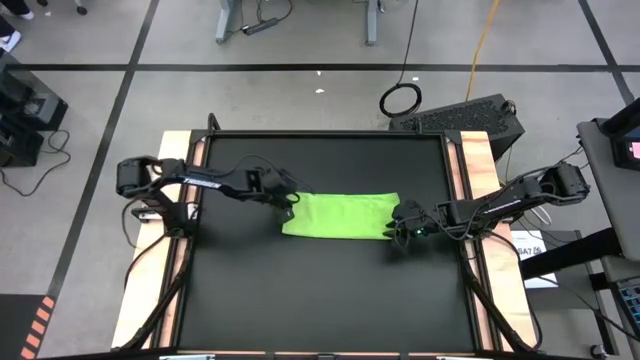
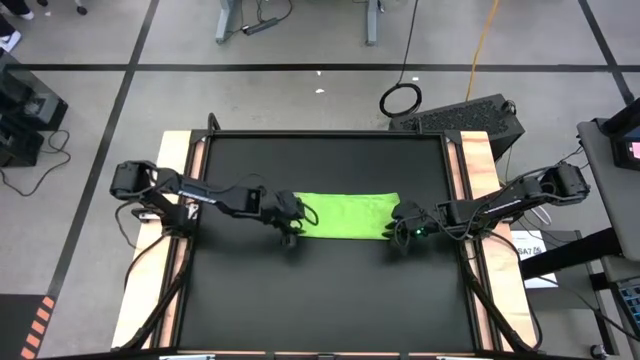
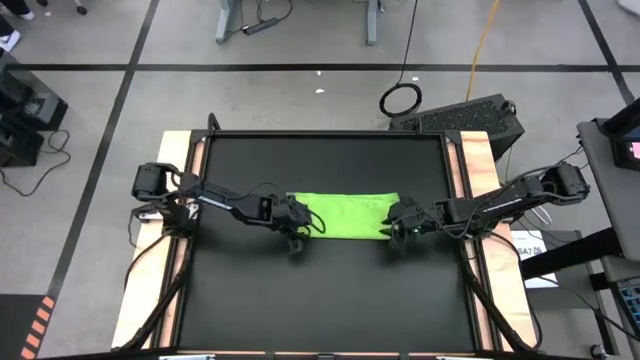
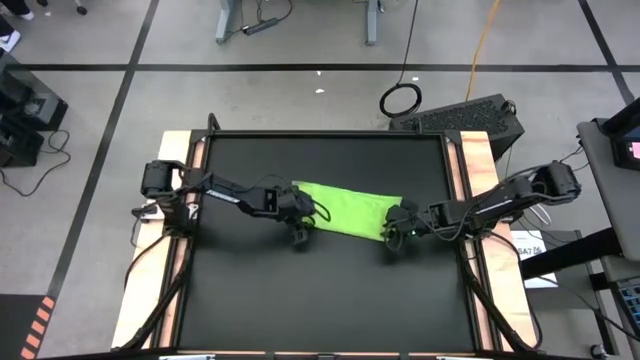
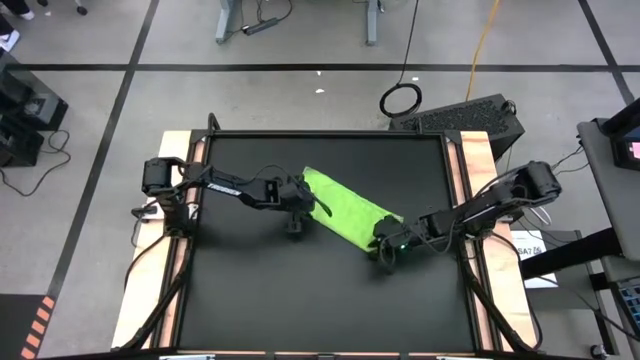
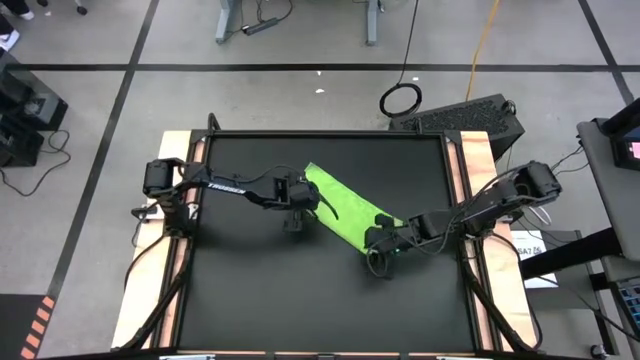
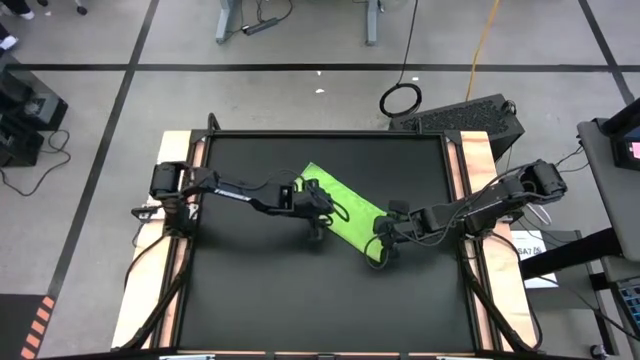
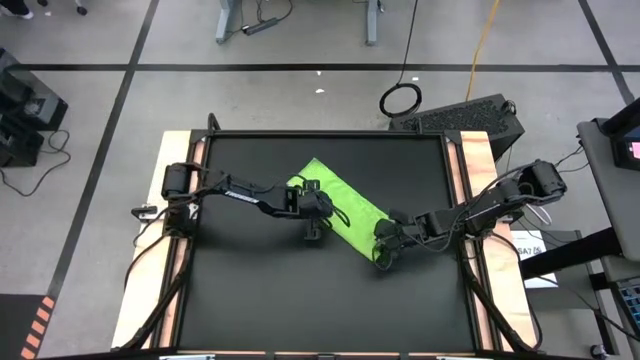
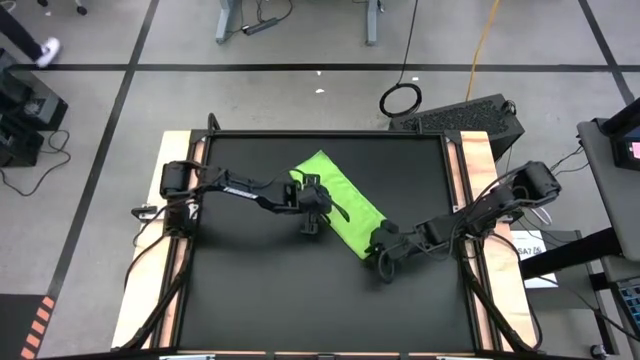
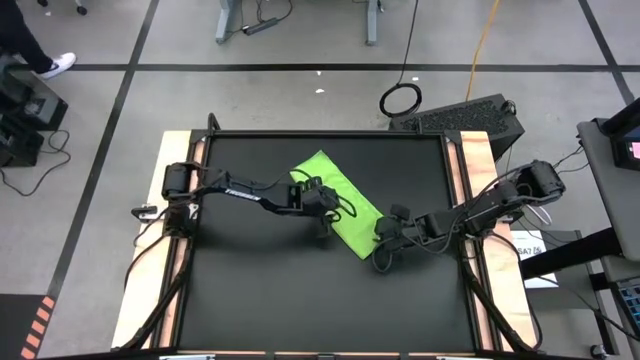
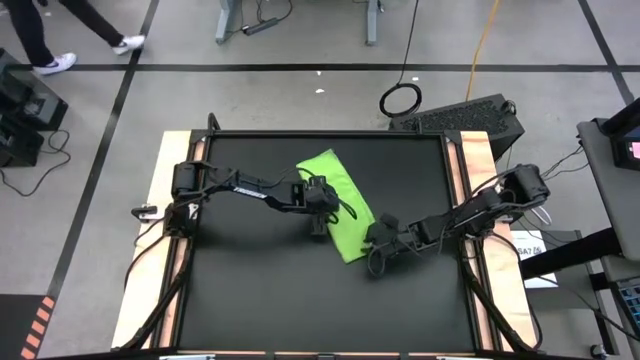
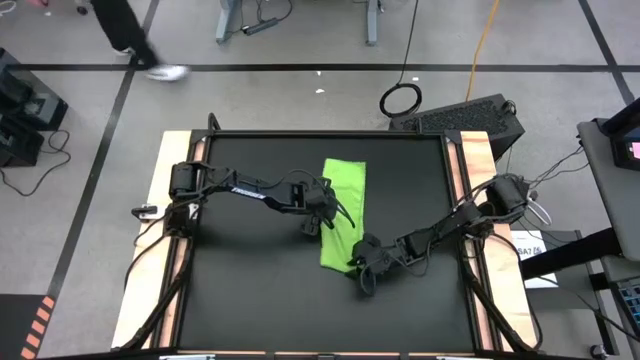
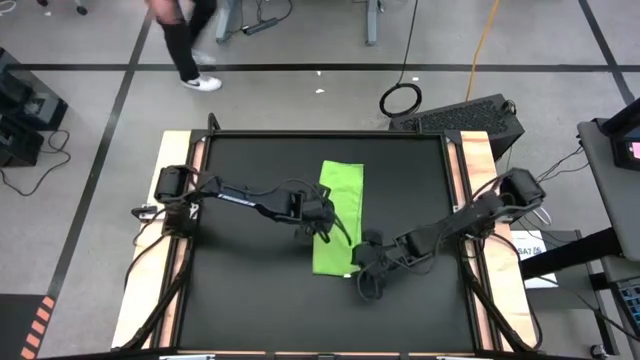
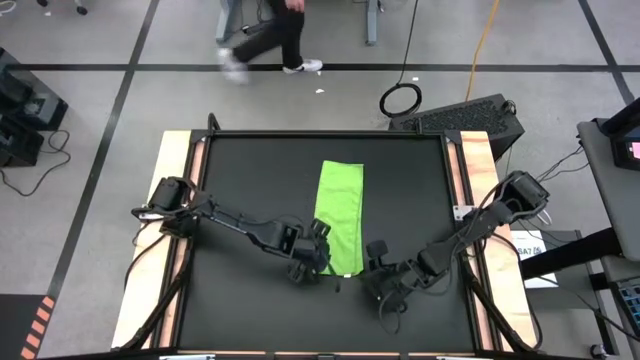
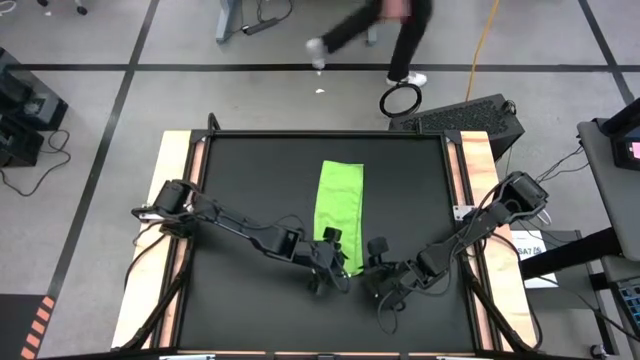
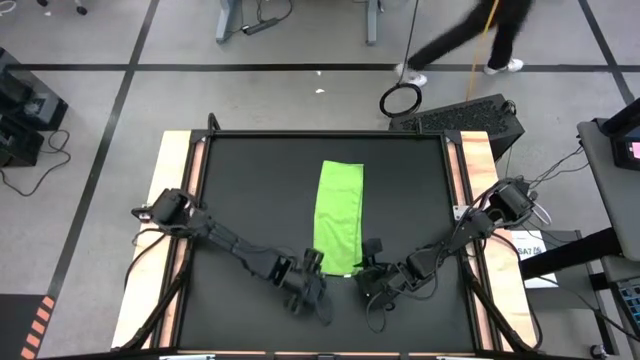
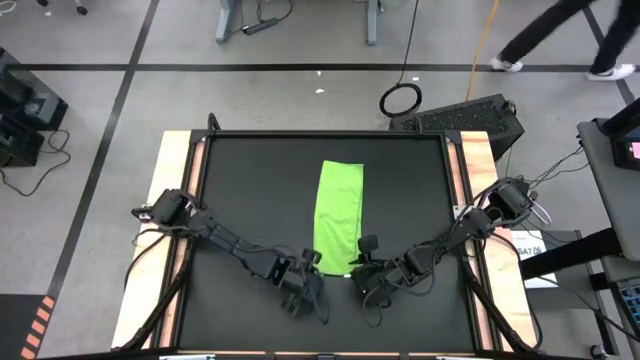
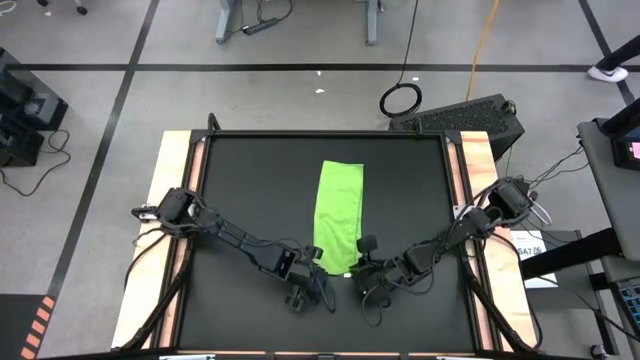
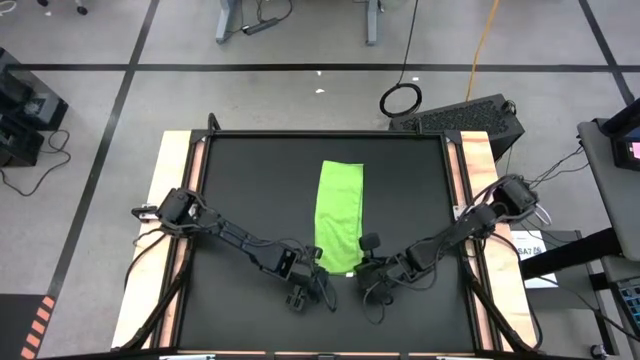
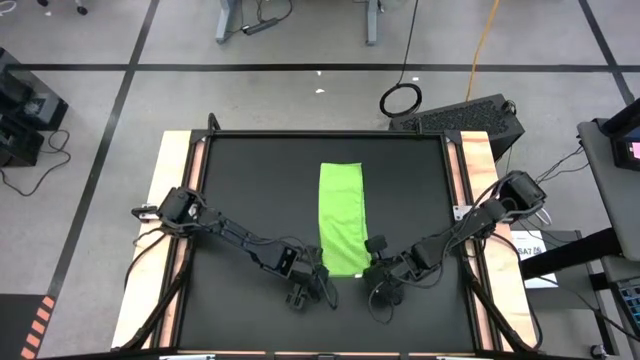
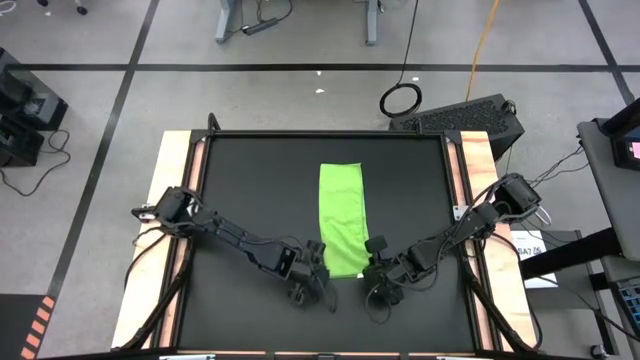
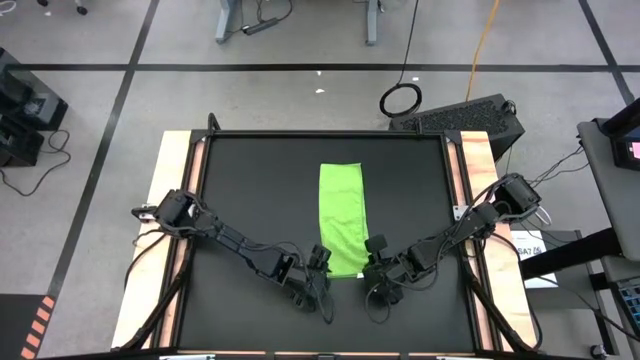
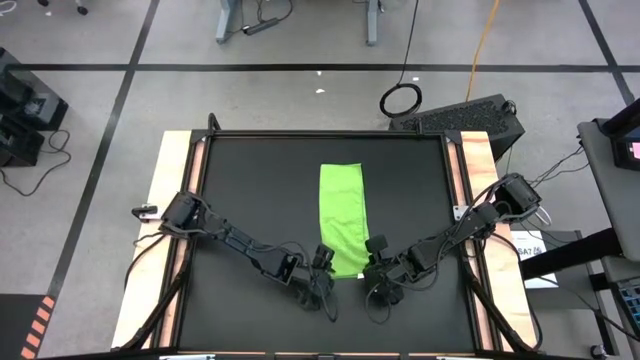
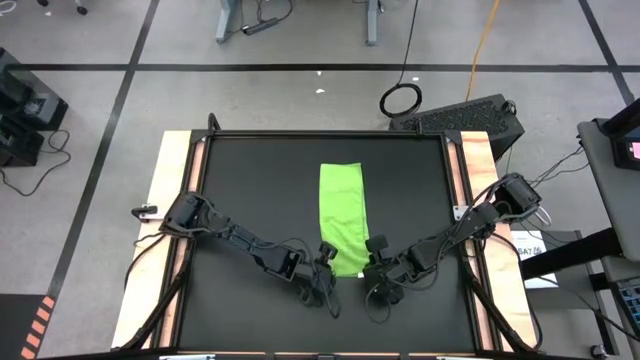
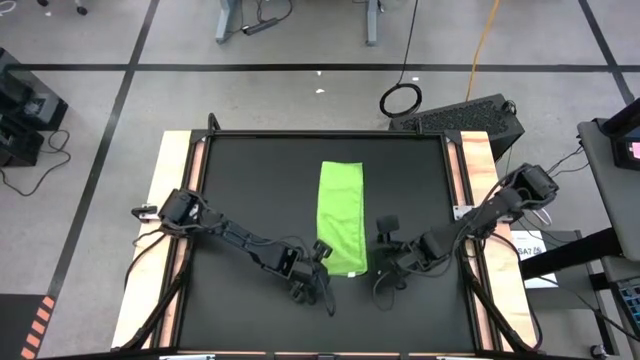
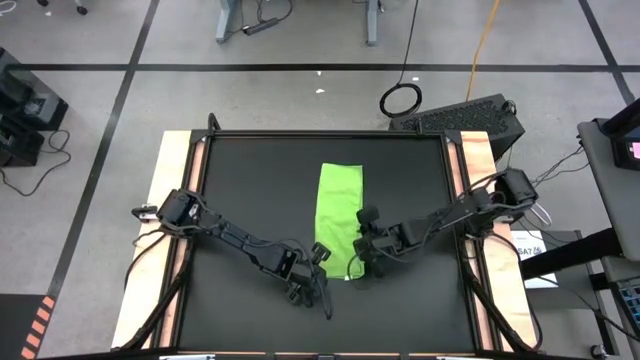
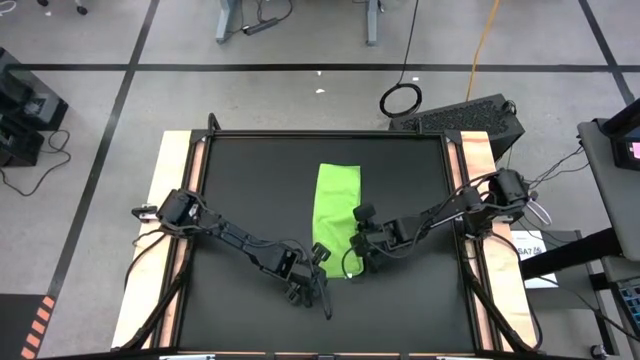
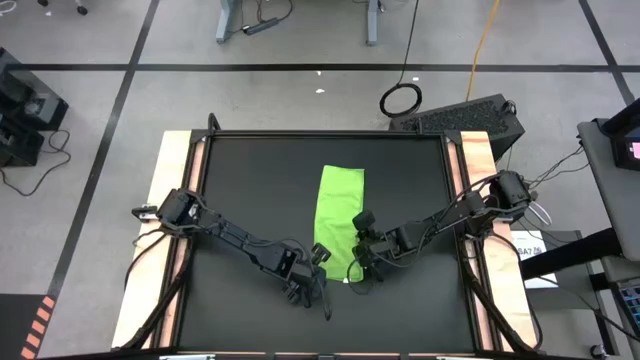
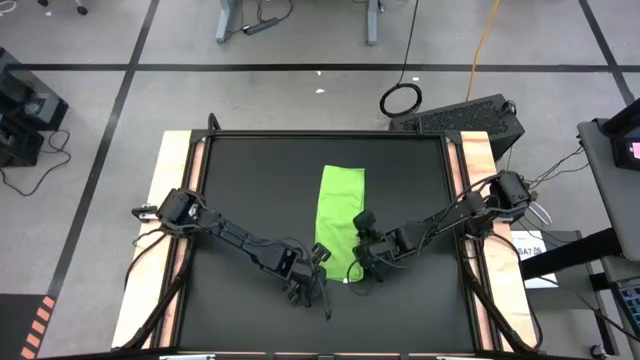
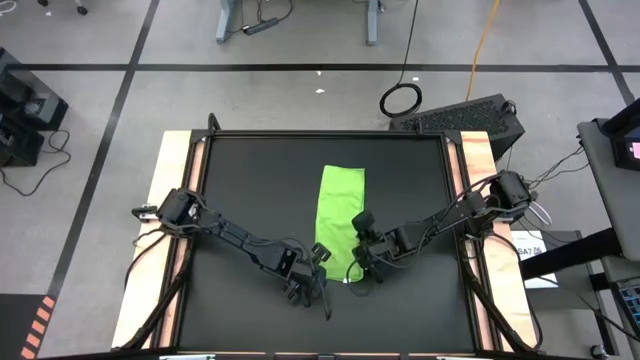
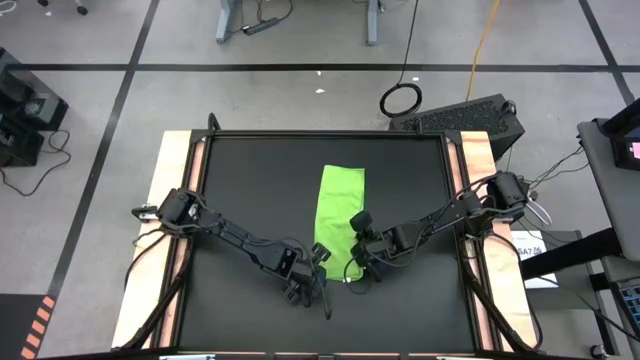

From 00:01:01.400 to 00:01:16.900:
Task: Roll towel
Fold green microfiber towel

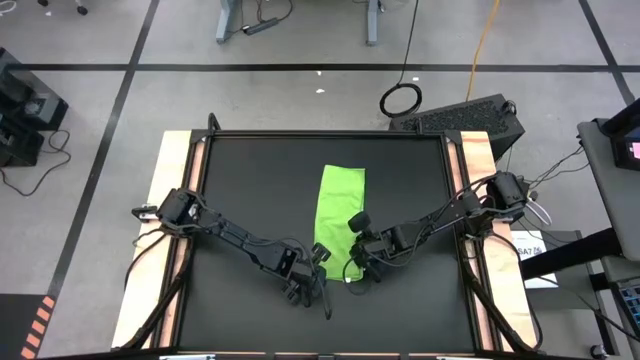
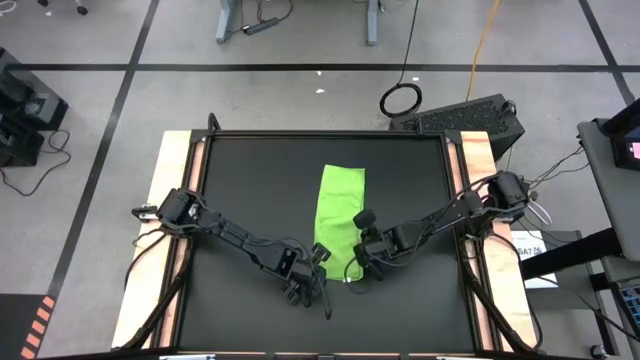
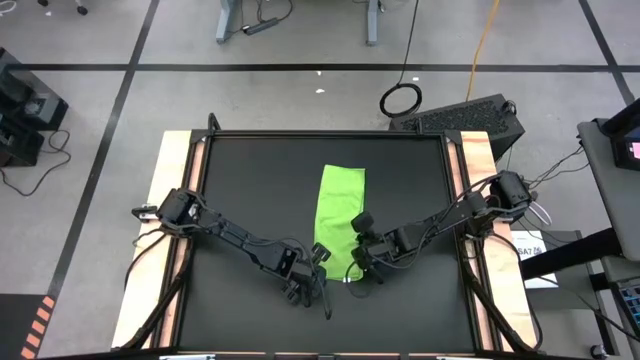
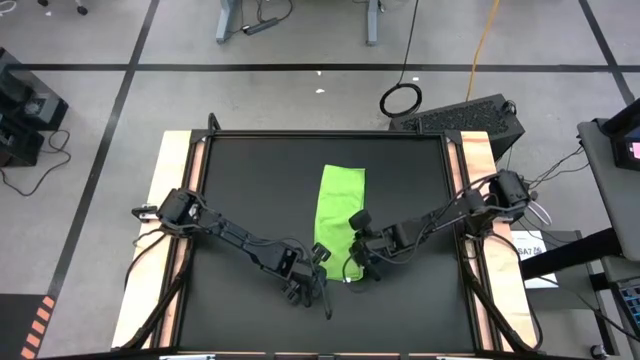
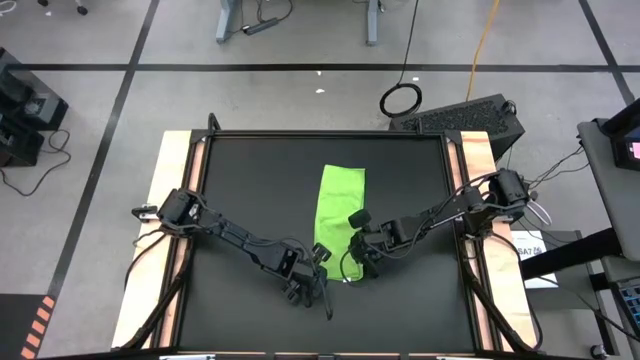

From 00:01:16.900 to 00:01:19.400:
Fold green microfiber towel

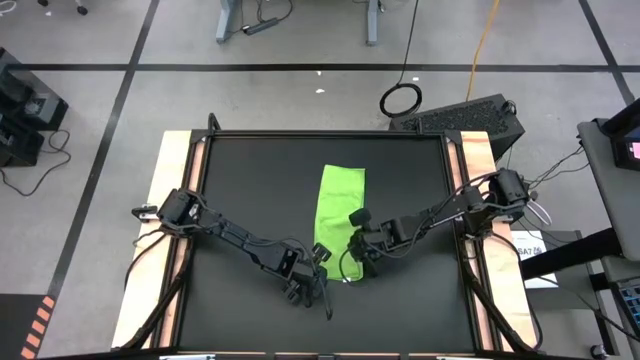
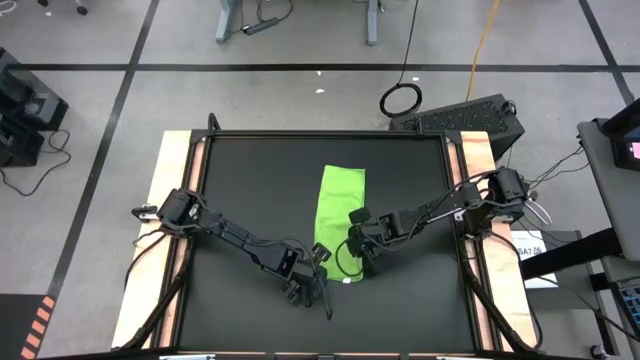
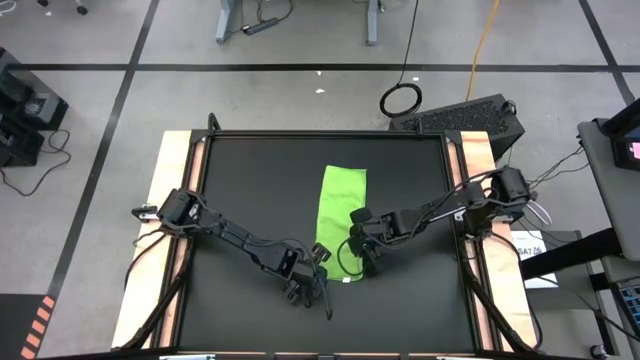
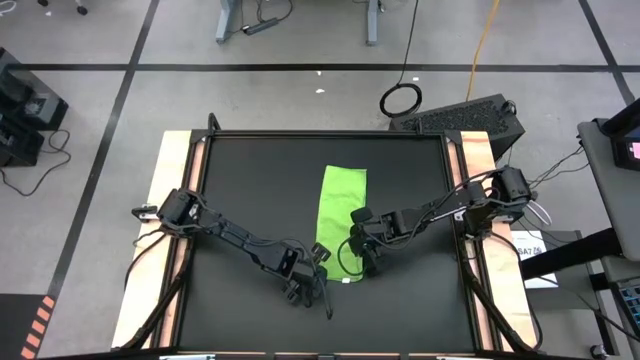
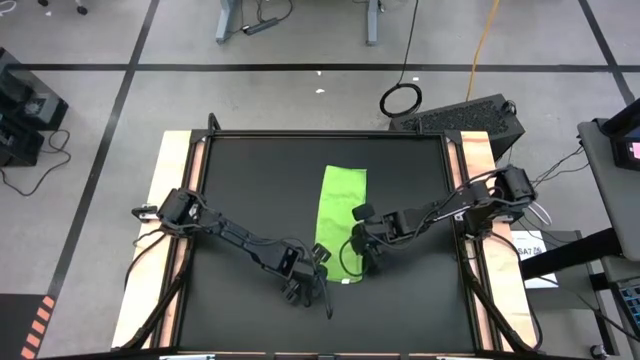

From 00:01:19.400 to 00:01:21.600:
Fold green microfiber towel
